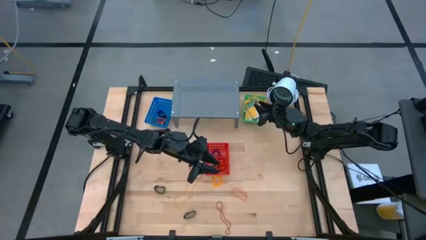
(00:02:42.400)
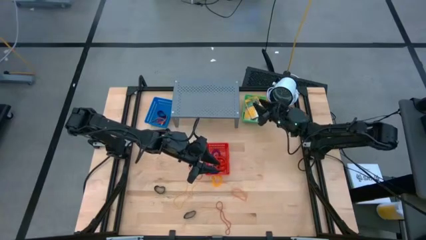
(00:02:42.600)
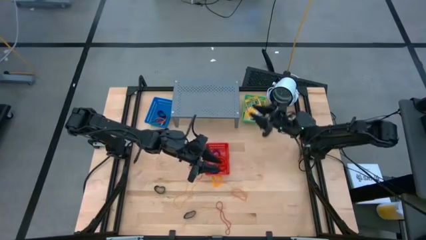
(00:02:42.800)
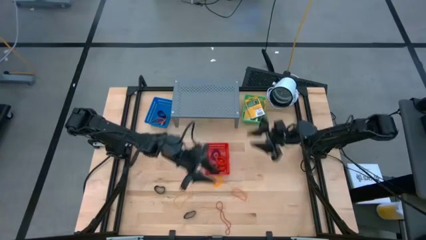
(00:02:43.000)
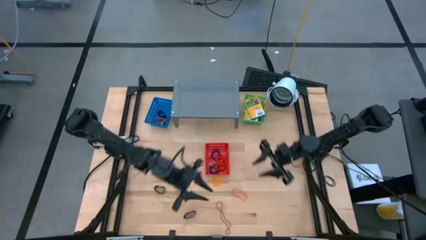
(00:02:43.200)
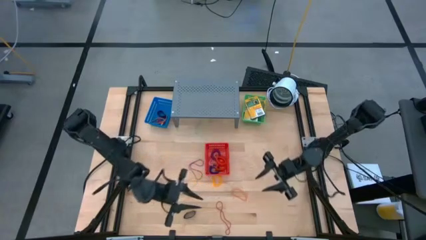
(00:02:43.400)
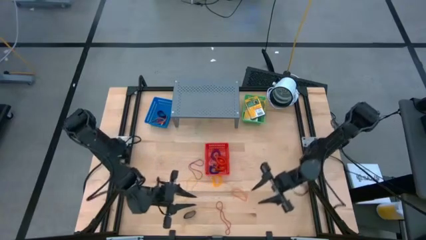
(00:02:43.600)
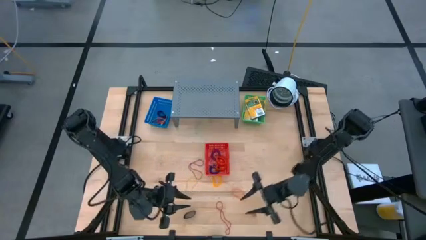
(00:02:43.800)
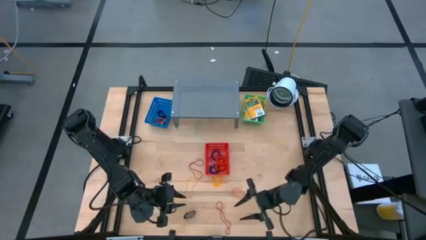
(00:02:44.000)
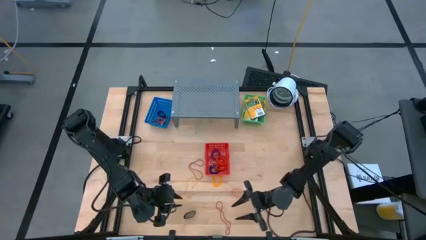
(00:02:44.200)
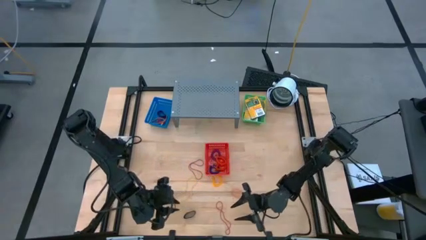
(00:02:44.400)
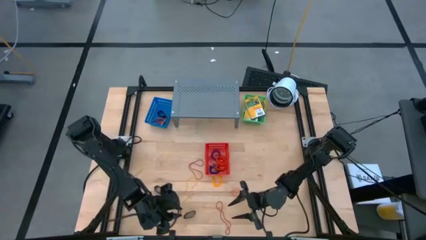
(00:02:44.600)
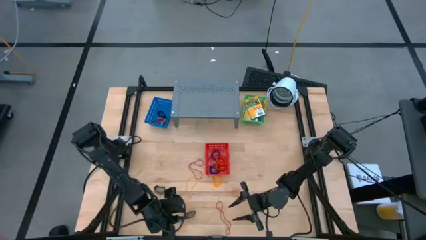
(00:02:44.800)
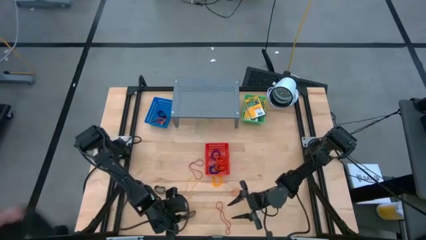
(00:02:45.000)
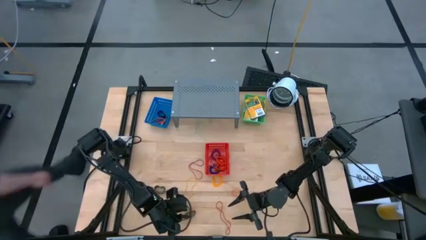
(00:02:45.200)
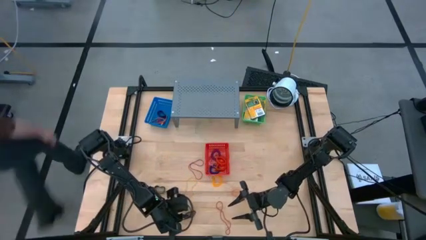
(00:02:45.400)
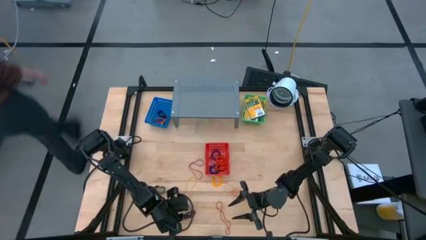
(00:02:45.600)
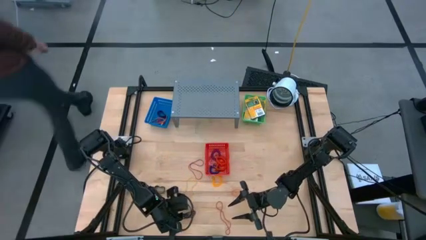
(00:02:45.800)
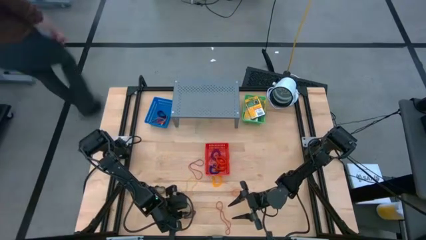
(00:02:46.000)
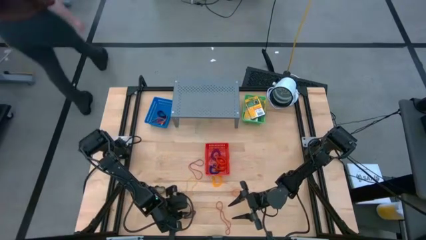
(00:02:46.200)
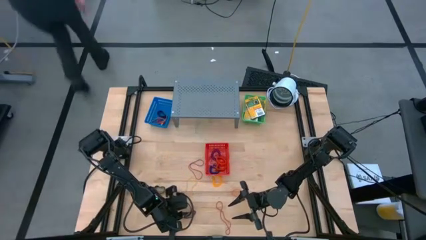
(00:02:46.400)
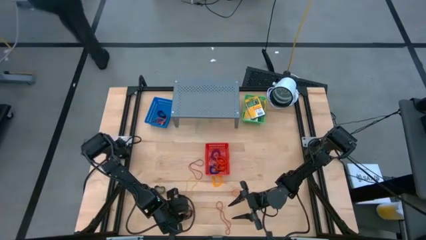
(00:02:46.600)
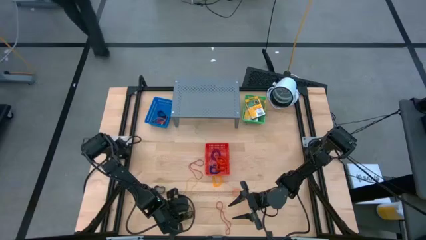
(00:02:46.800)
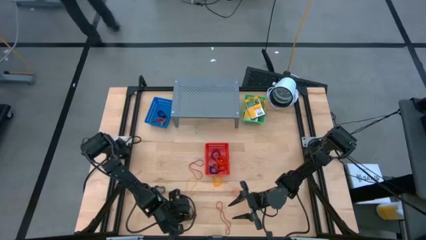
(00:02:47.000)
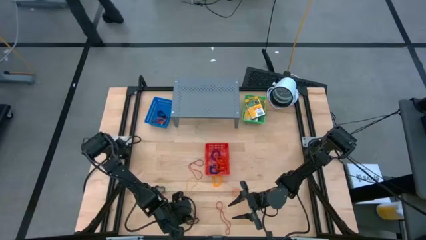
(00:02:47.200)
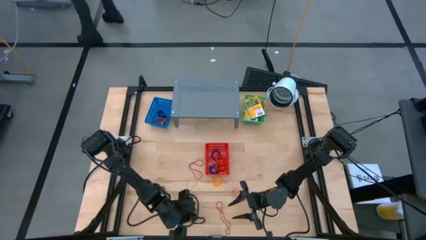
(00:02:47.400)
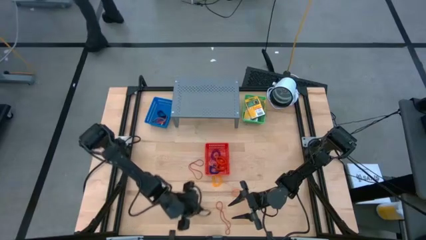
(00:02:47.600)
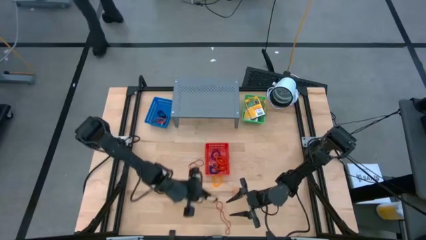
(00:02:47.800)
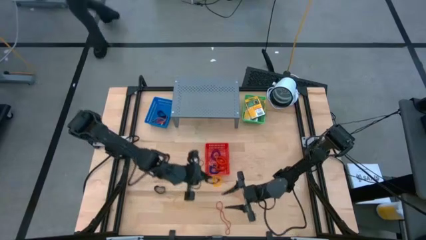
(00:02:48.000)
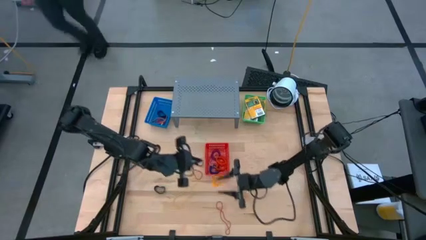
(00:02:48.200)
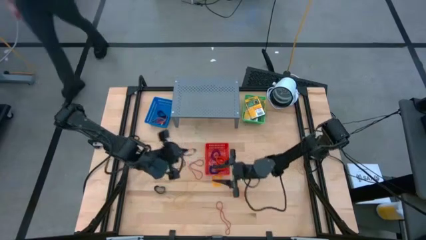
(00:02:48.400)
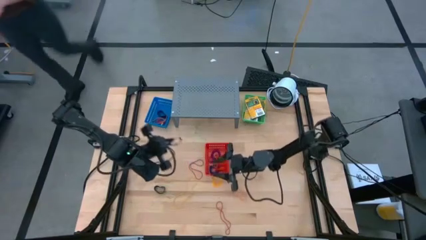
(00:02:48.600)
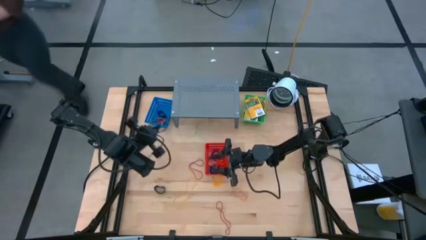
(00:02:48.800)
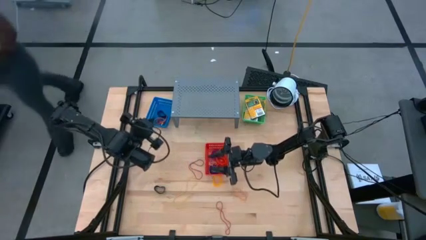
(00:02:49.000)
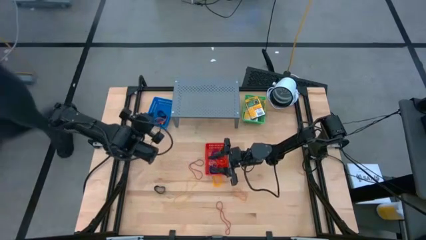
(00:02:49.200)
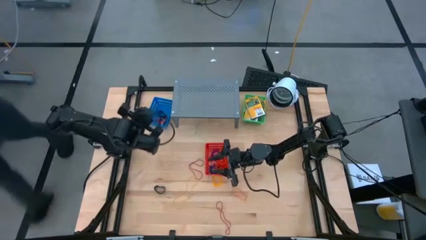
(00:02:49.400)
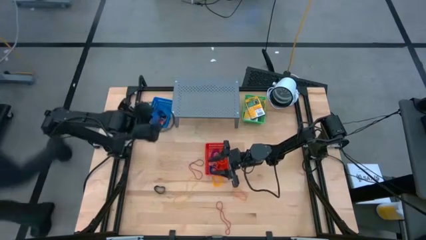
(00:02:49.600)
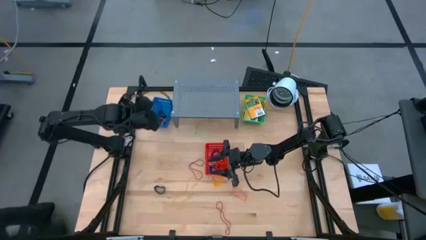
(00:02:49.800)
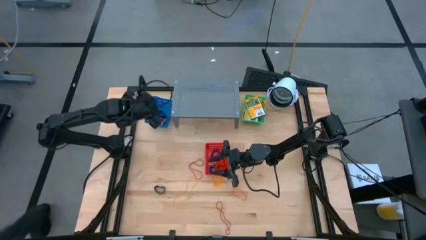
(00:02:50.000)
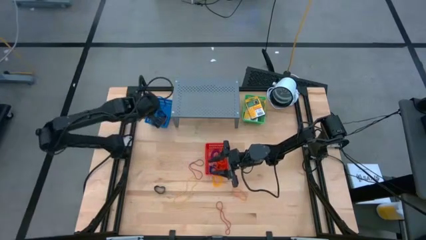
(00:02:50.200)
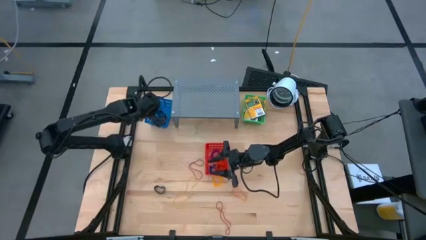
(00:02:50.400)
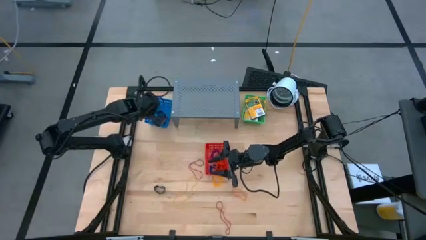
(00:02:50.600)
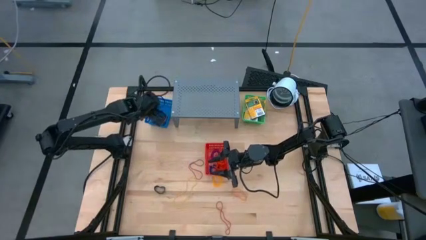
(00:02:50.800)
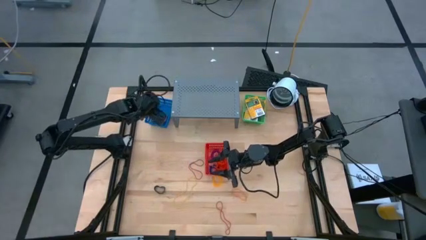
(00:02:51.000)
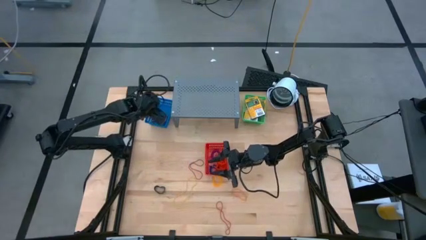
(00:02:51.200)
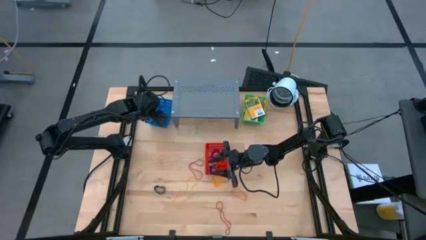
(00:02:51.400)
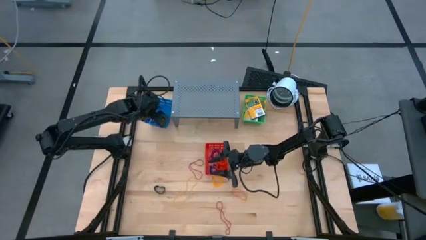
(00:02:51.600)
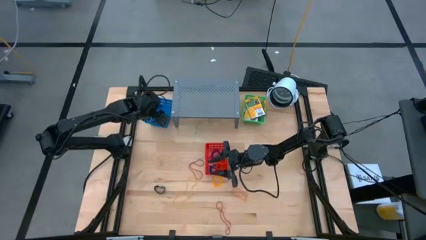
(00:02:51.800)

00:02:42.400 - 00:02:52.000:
Task: Pick & Place Office Desk Supplies
Put the bottom black rubber band into the blue basket

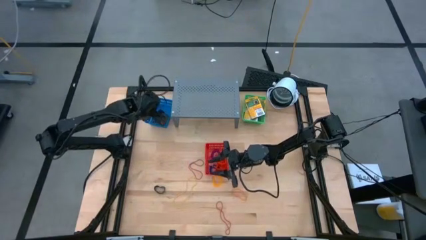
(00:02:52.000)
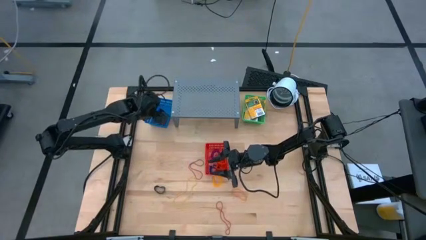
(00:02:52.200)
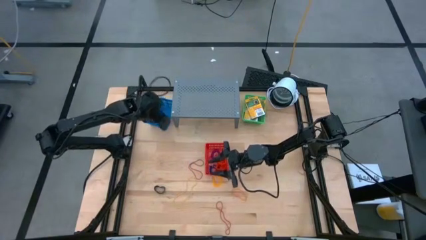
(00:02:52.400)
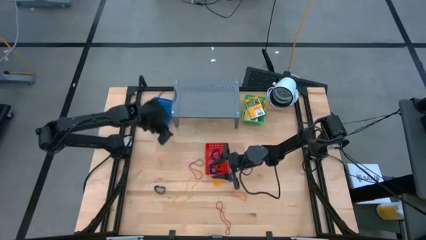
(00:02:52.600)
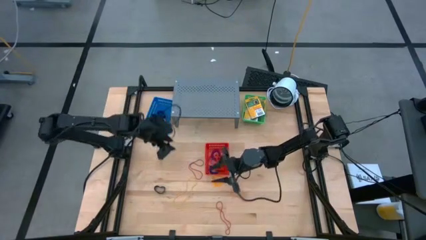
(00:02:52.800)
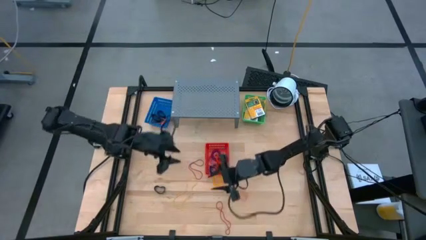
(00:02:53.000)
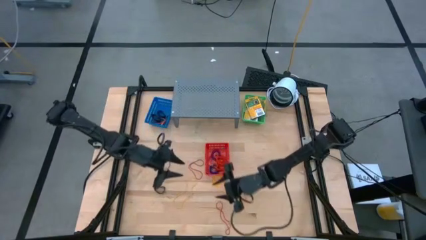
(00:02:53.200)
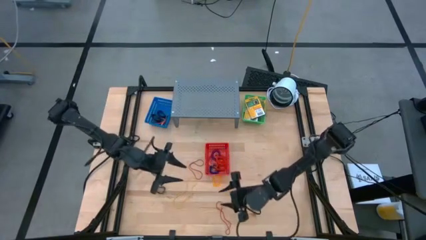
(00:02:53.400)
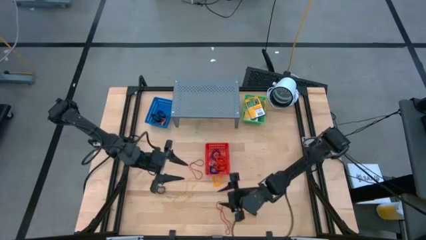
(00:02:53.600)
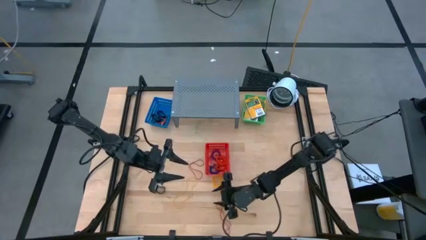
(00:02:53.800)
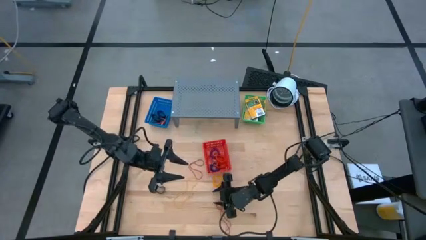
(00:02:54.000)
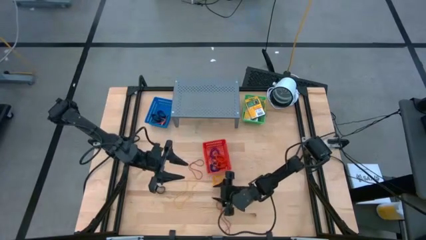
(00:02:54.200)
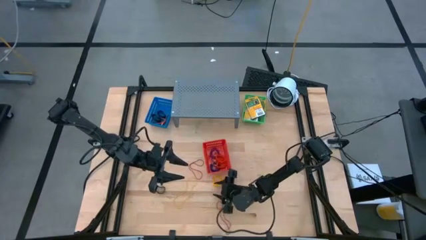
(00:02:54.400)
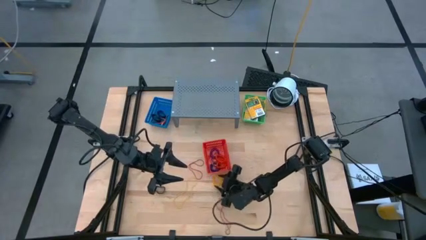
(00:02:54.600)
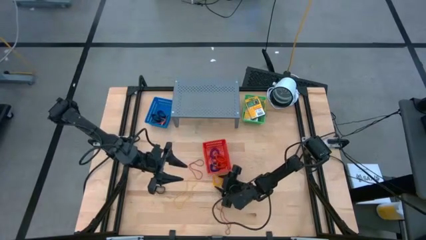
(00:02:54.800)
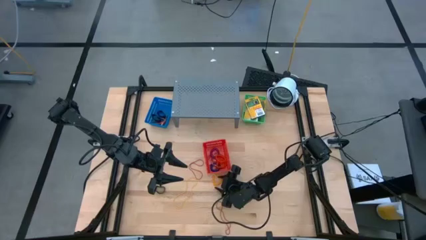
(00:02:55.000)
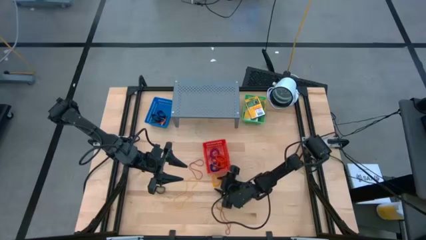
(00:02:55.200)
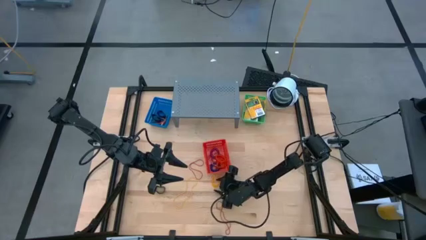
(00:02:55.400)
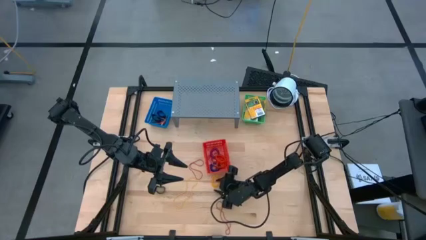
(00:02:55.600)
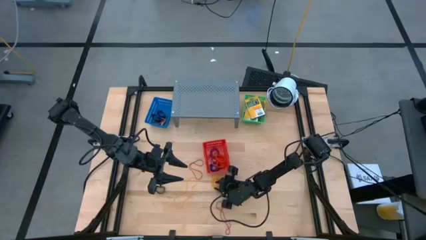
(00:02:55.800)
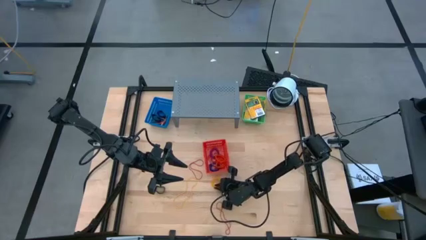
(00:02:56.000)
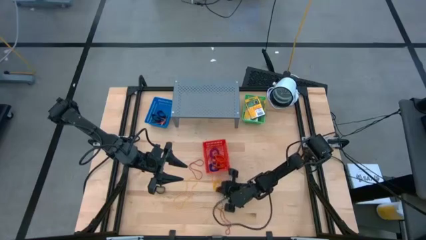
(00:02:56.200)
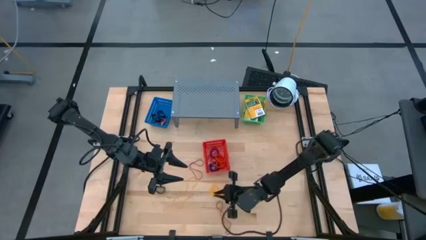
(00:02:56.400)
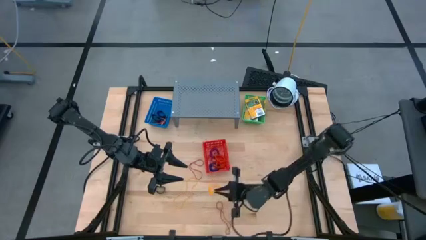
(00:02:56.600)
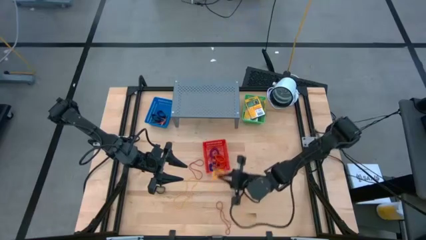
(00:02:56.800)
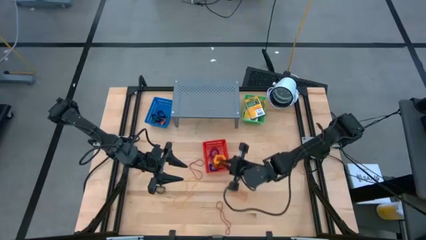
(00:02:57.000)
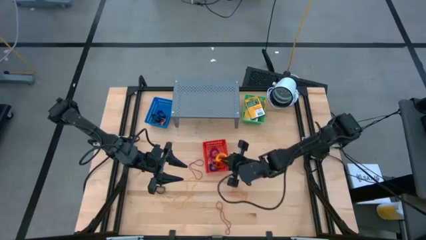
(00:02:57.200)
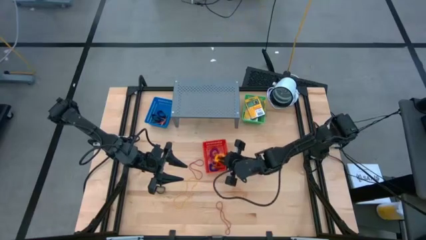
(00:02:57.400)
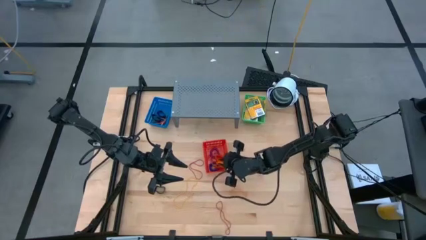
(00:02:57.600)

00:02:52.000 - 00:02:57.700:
Put the yellow spring keychain into the red basket
